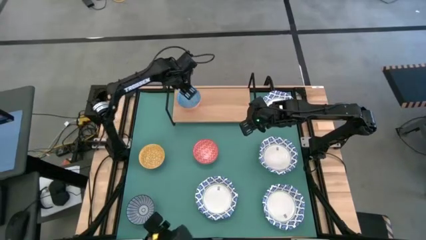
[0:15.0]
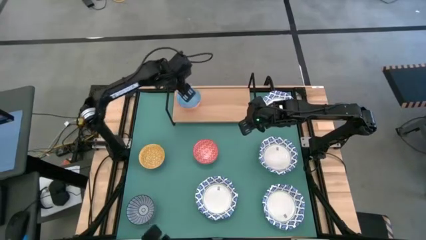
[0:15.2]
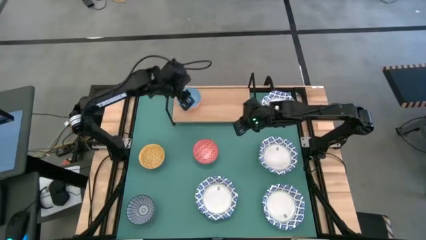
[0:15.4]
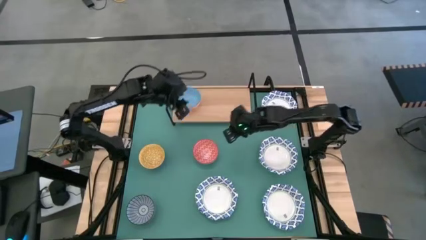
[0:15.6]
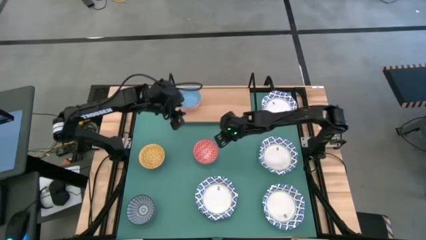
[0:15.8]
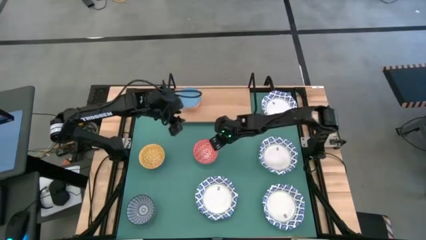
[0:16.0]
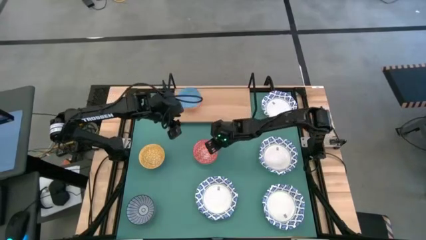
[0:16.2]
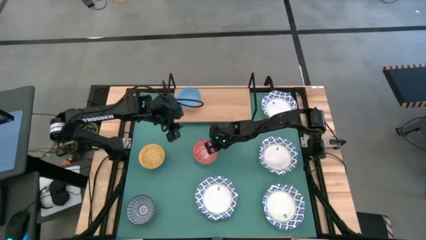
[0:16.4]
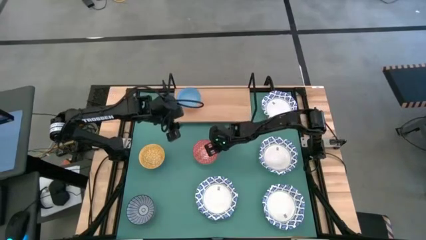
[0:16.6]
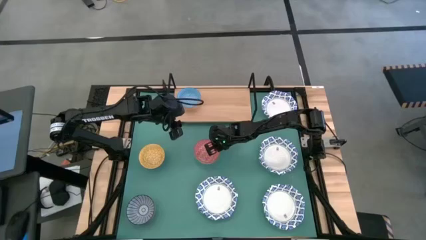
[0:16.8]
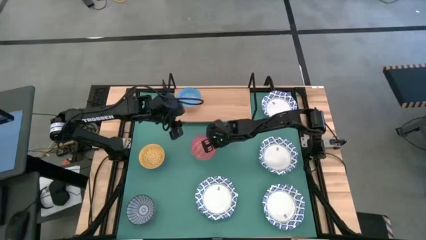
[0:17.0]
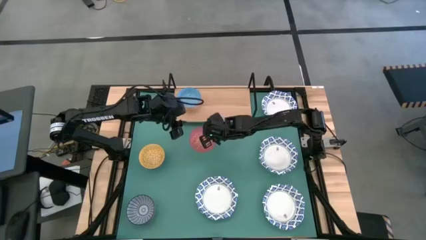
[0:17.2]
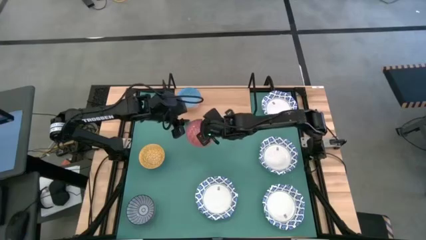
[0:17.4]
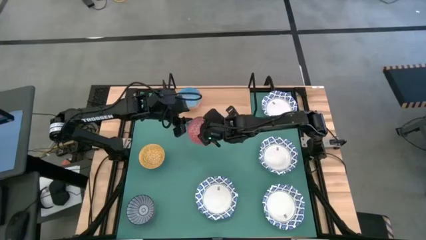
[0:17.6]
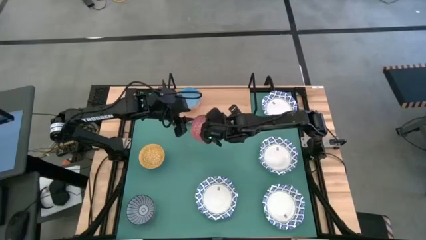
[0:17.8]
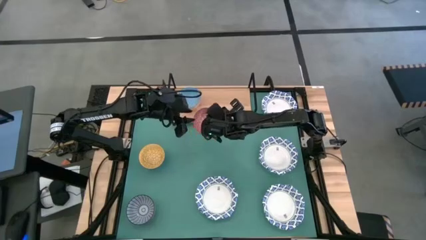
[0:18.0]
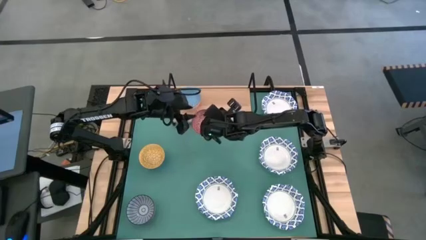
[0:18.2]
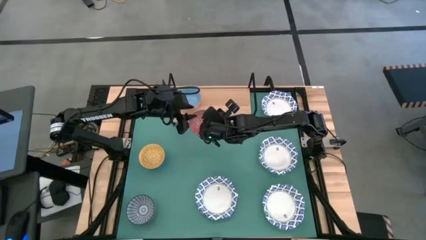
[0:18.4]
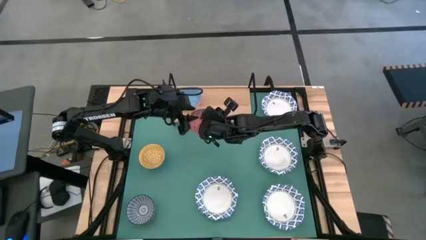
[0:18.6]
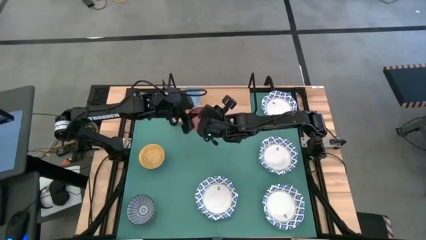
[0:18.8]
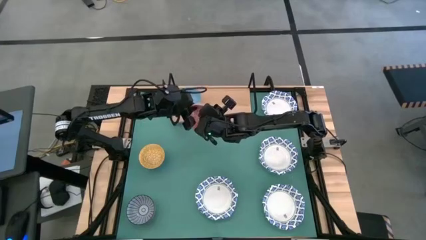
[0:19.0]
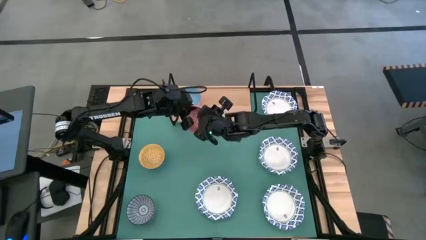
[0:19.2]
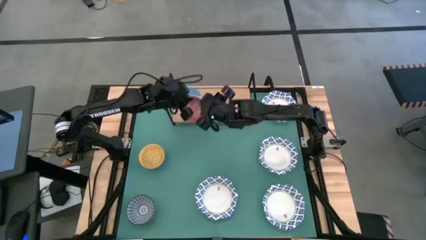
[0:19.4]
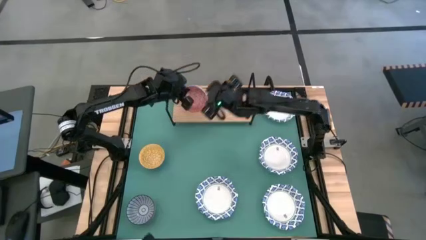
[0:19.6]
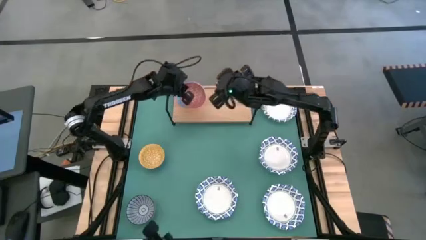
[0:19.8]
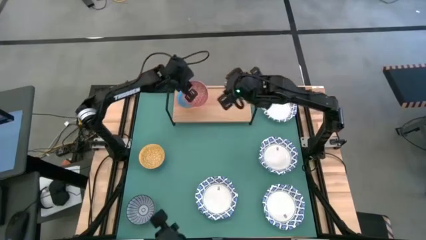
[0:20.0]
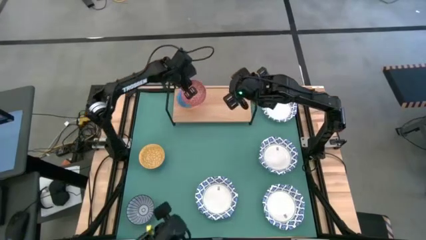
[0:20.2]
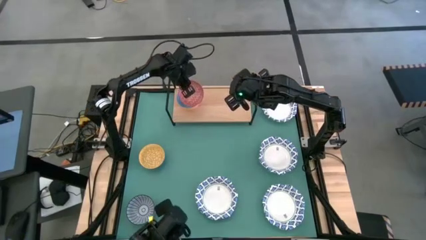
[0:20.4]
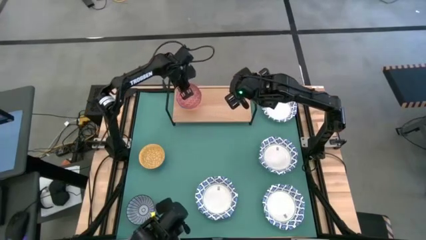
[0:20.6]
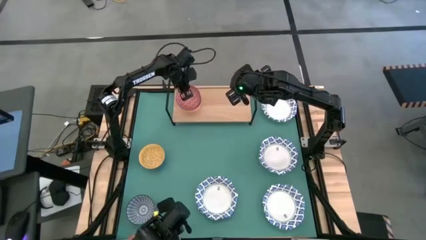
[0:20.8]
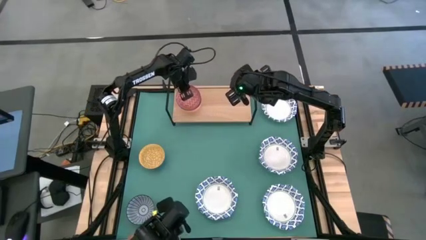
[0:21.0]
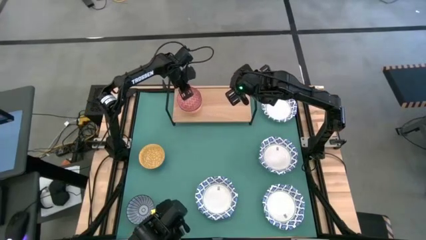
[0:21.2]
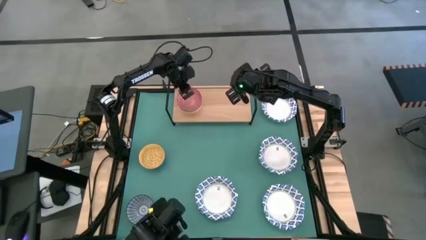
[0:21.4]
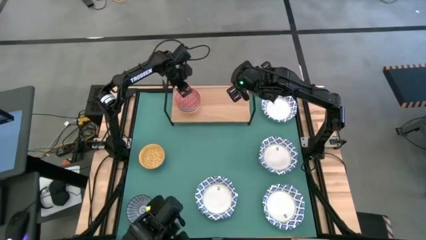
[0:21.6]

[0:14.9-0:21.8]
Task: Place and stack bowls onto a shelf
Stack the red patterned bowl on top of the light blue bowl on the shelf

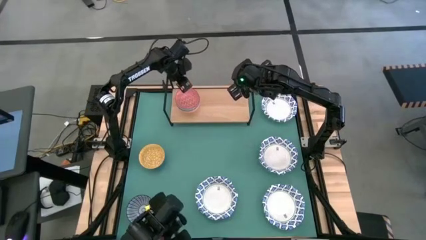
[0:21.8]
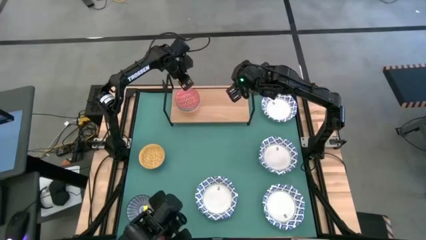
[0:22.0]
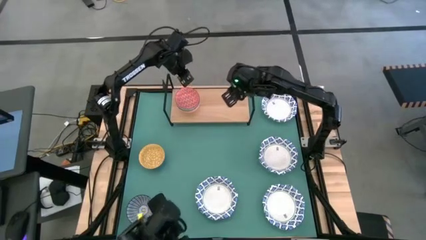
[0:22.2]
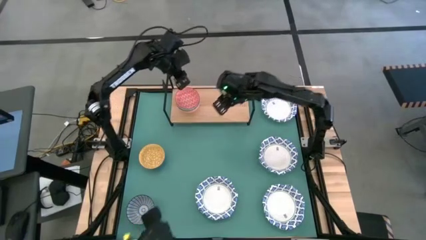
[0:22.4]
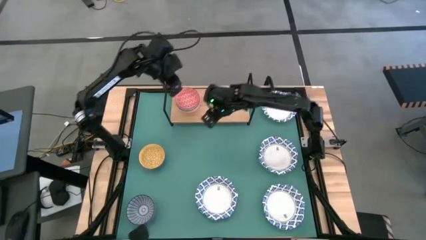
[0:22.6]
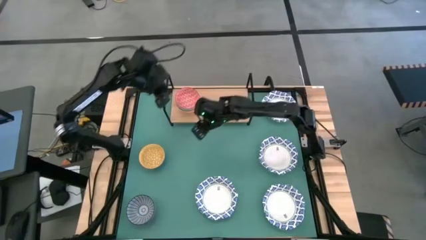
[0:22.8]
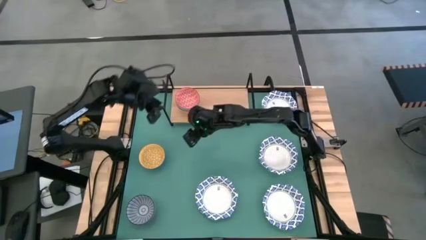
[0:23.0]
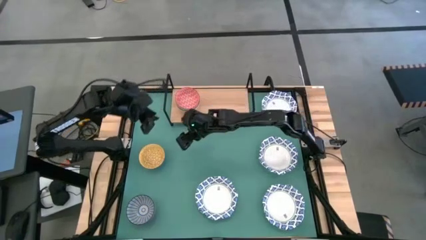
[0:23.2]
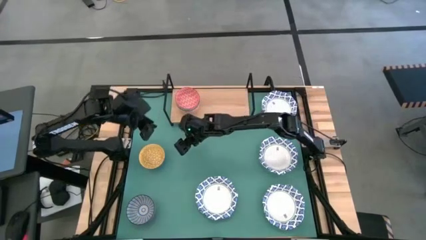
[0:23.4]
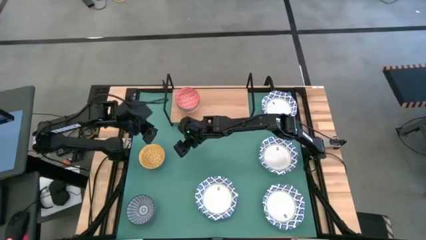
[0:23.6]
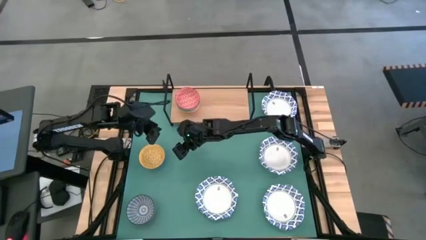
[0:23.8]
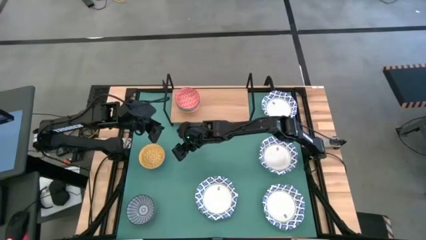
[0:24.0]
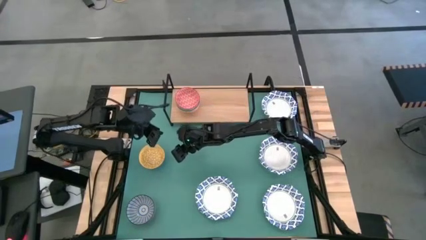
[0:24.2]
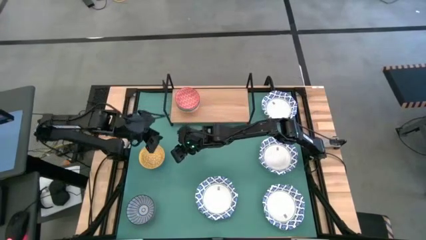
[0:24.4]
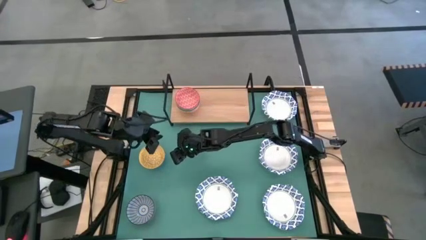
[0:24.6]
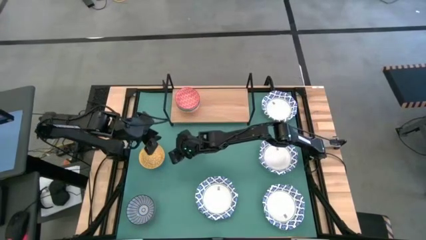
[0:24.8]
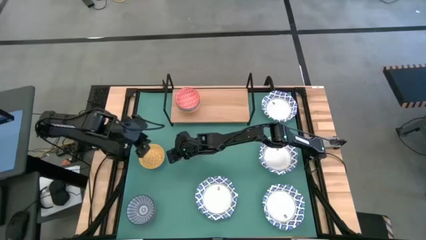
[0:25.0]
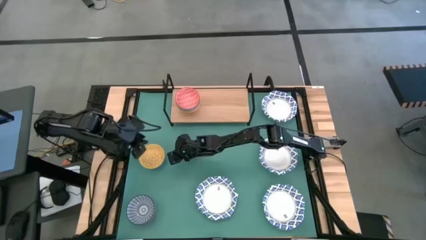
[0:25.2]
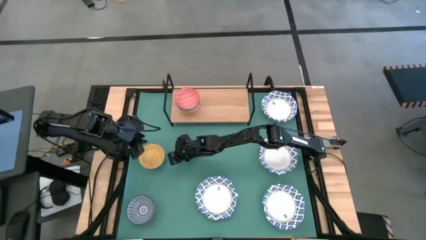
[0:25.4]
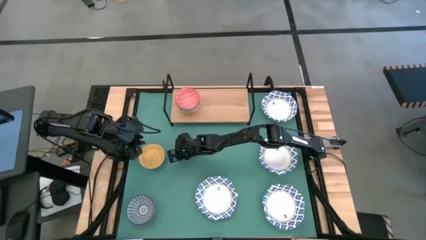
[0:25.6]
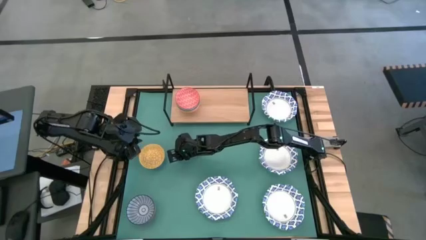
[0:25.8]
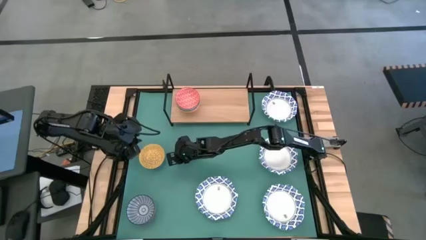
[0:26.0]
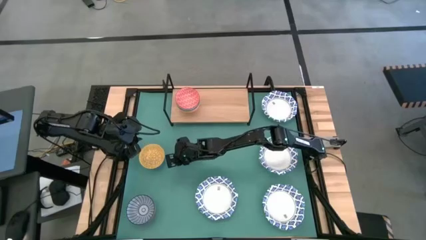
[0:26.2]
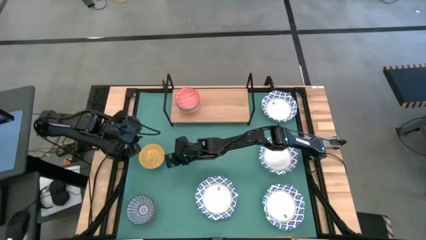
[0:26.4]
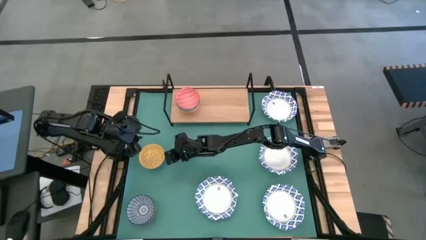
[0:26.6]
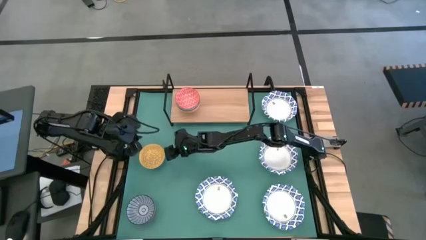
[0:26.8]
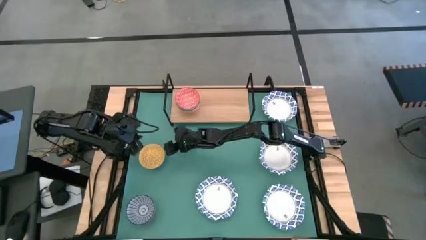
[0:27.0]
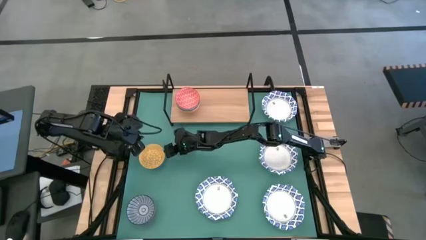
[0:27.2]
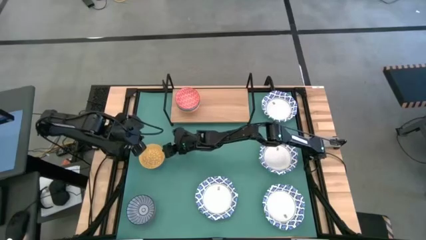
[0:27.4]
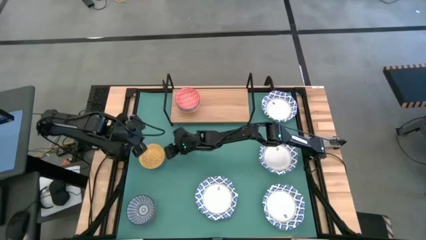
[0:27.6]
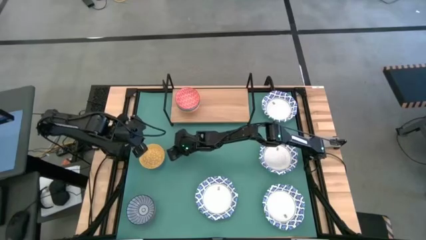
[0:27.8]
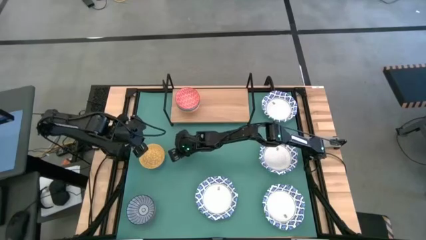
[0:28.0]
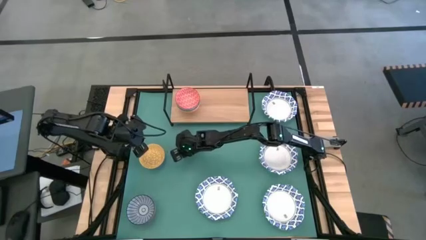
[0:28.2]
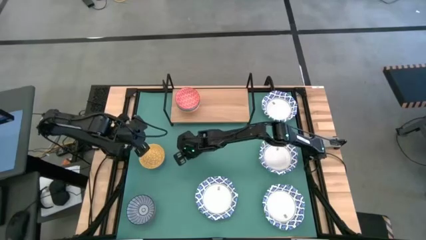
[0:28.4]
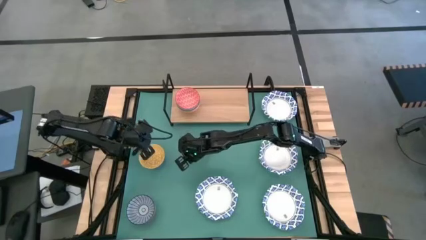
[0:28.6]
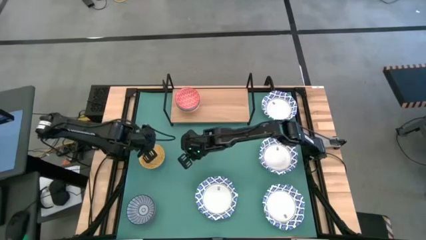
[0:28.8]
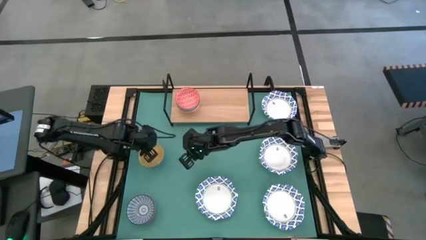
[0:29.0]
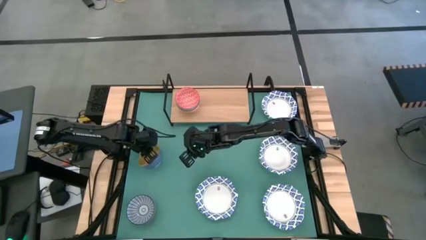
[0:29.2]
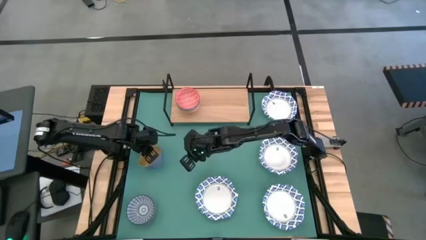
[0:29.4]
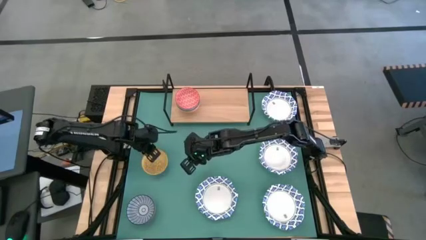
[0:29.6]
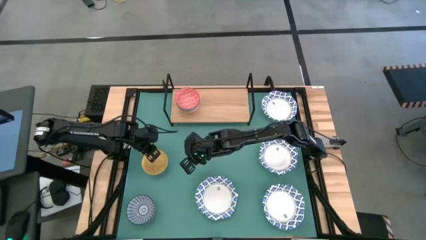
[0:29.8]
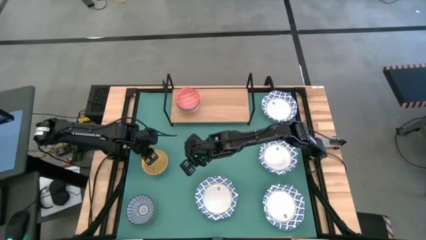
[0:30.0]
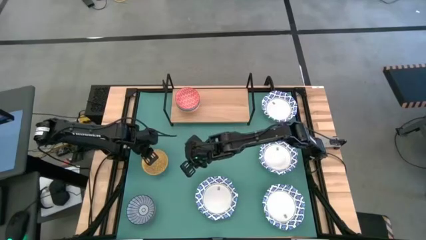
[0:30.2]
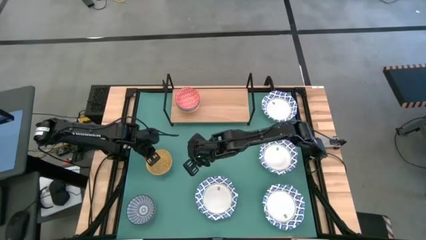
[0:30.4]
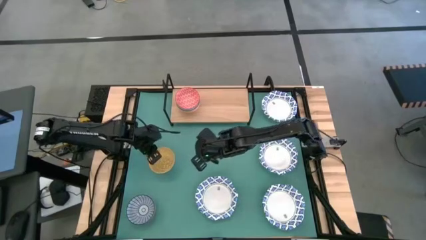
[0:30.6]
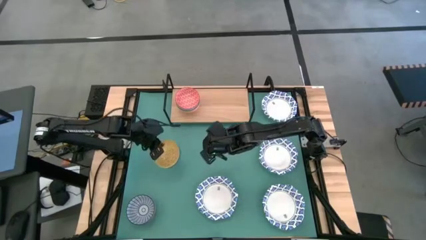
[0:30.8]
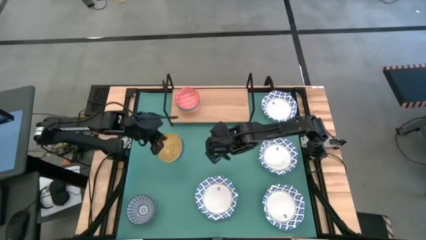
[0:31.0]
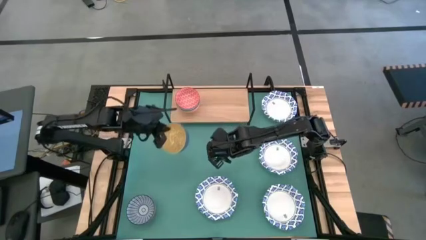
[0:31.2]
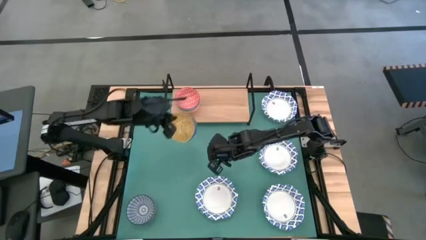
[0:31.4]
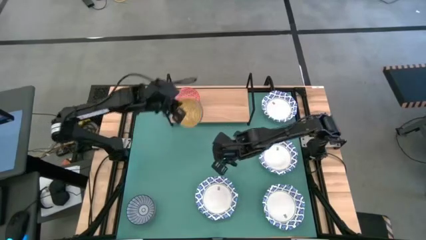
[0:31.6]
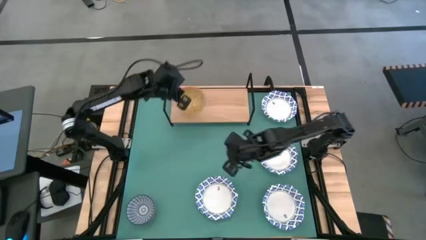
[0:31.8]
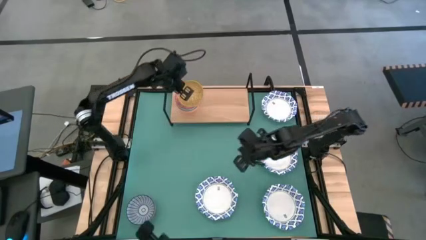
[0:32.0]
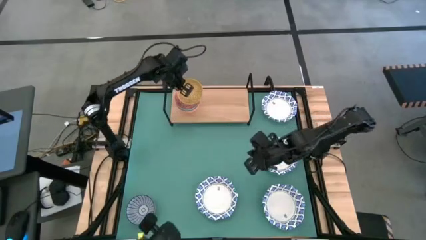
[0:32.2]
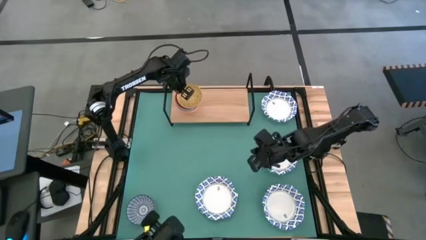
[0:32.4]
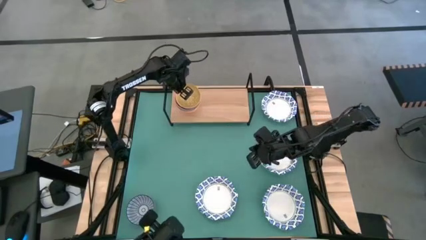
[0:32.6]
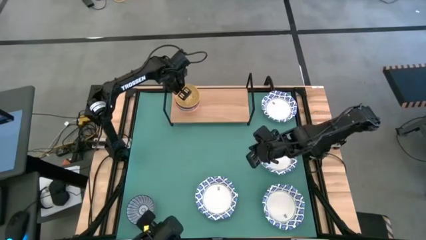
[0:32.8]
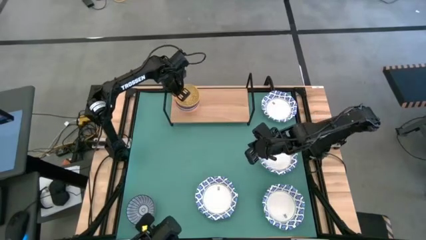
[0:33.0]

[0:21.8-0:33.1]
Stack the yellow patterned bowl on top of the red bowl on the shelf
